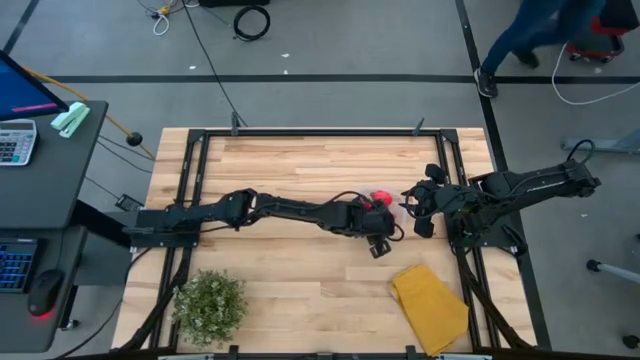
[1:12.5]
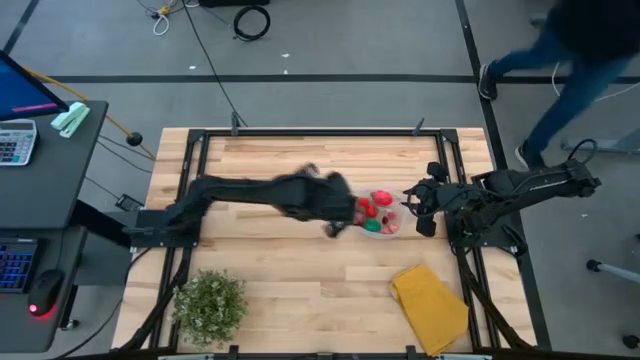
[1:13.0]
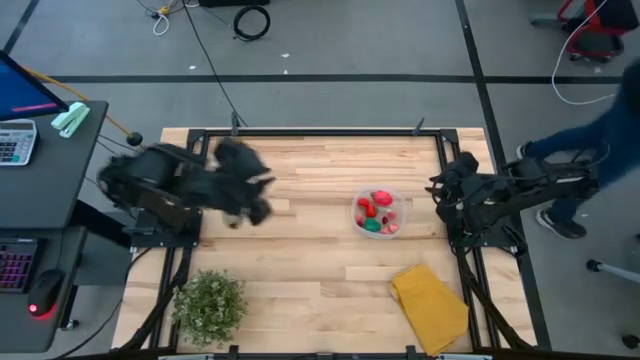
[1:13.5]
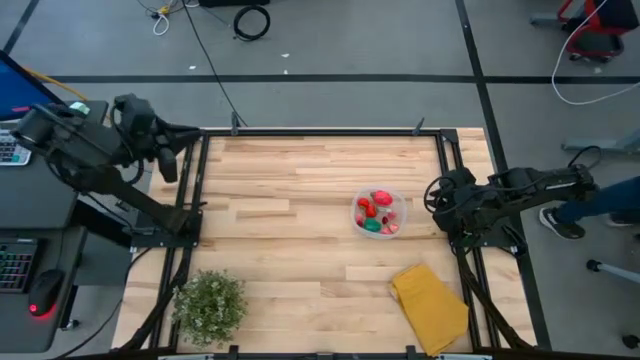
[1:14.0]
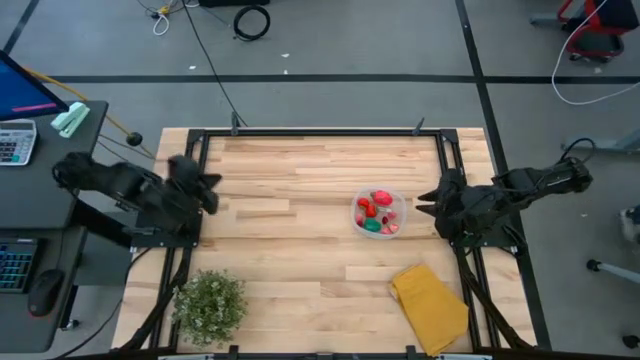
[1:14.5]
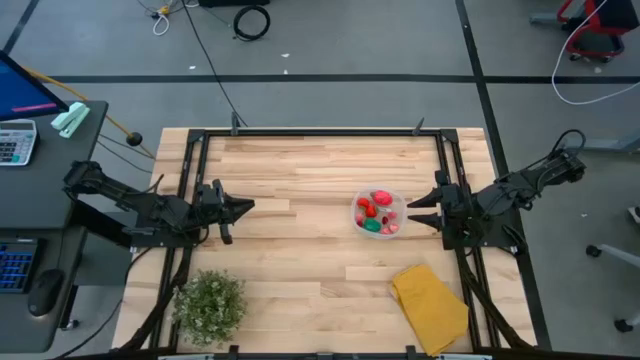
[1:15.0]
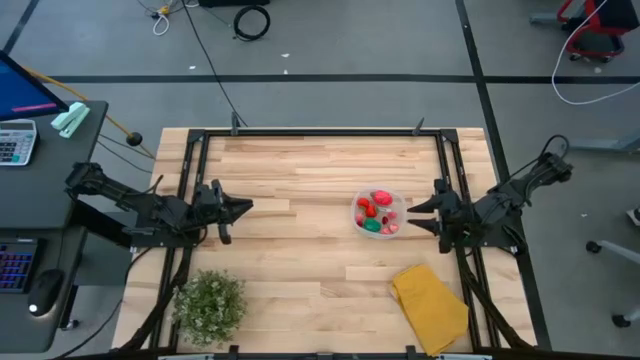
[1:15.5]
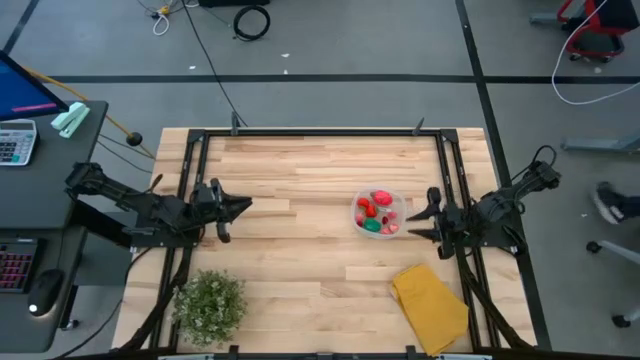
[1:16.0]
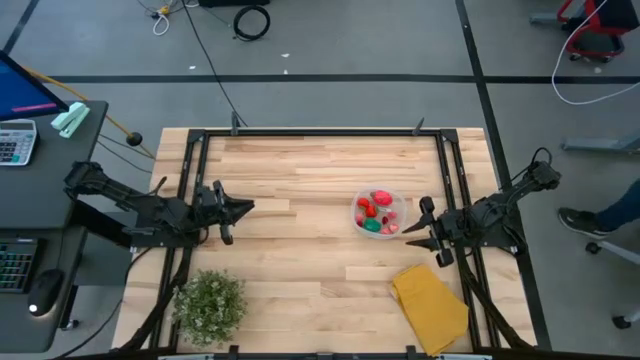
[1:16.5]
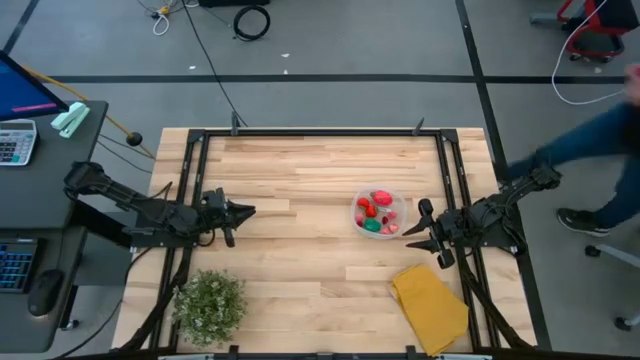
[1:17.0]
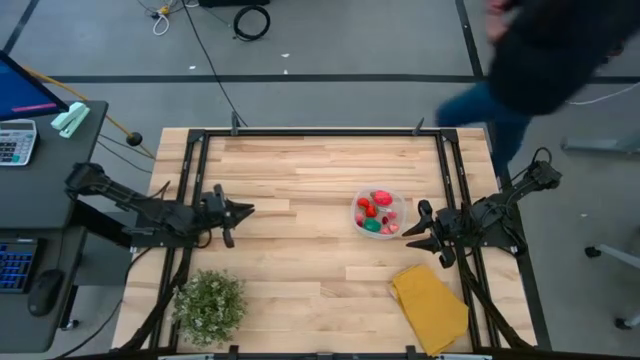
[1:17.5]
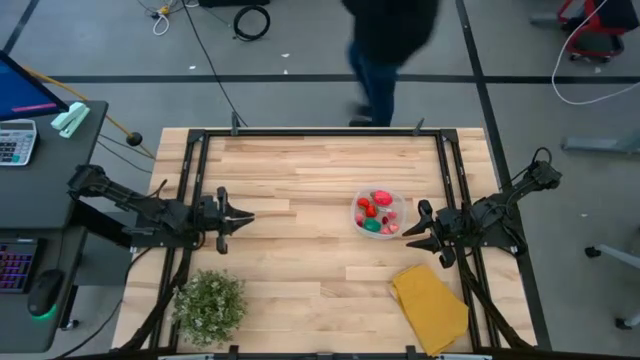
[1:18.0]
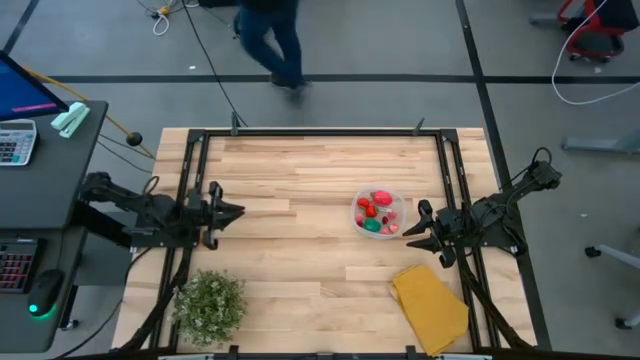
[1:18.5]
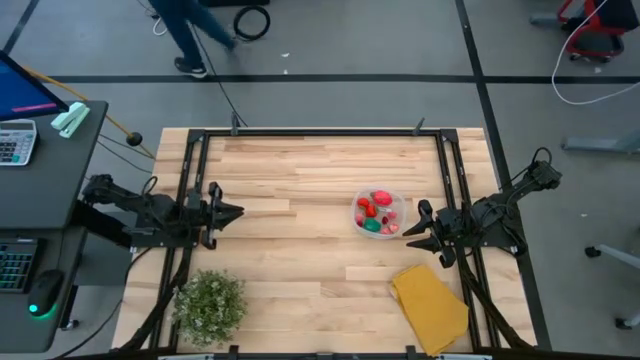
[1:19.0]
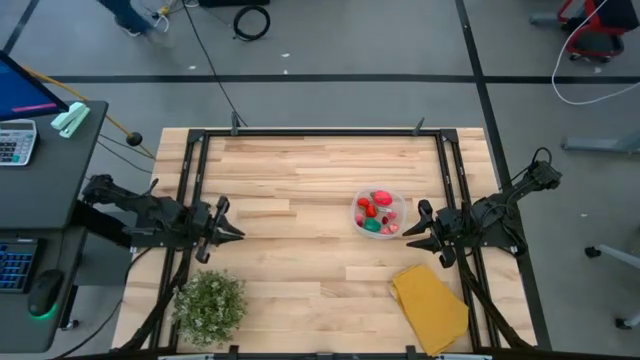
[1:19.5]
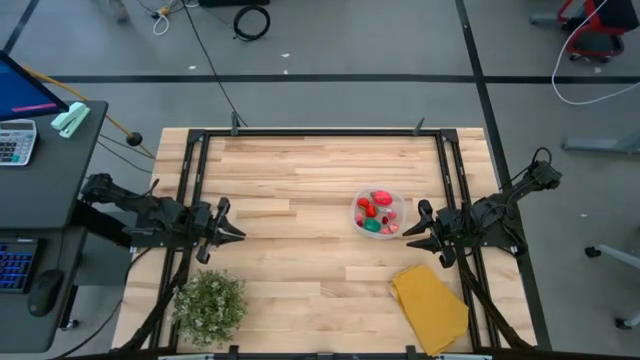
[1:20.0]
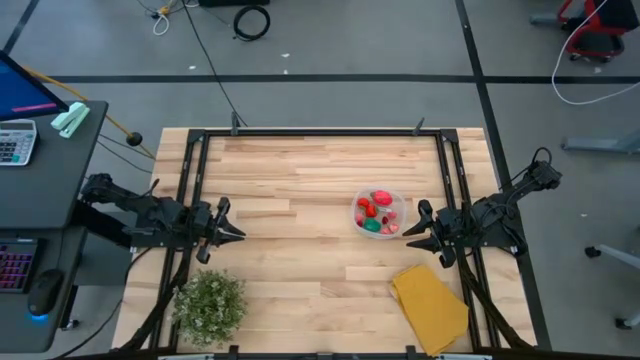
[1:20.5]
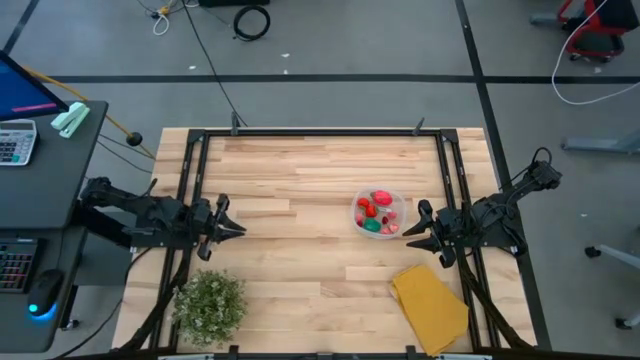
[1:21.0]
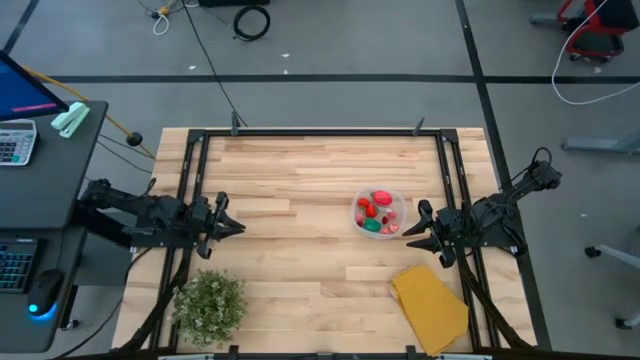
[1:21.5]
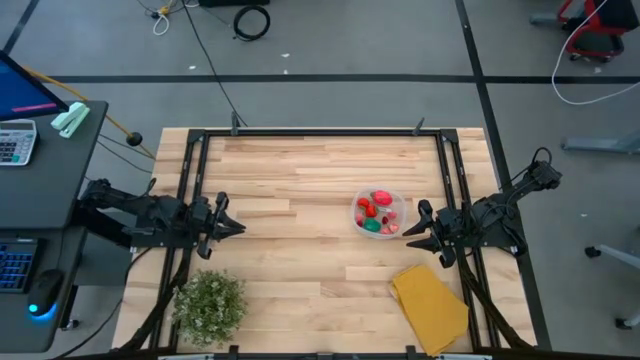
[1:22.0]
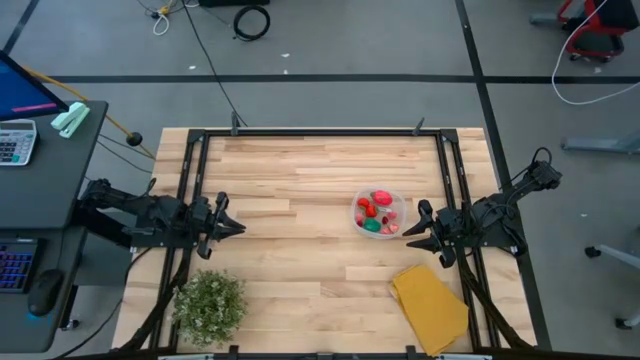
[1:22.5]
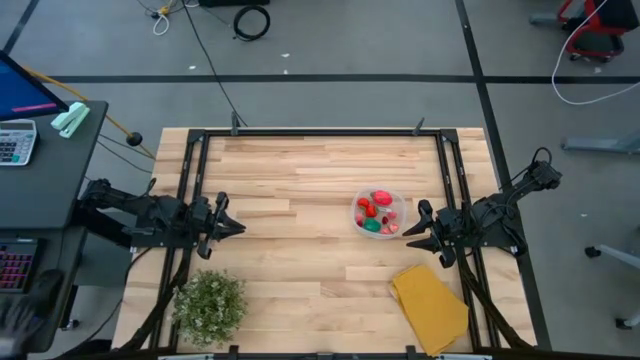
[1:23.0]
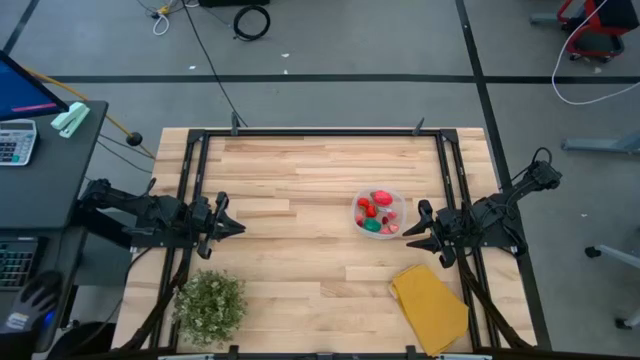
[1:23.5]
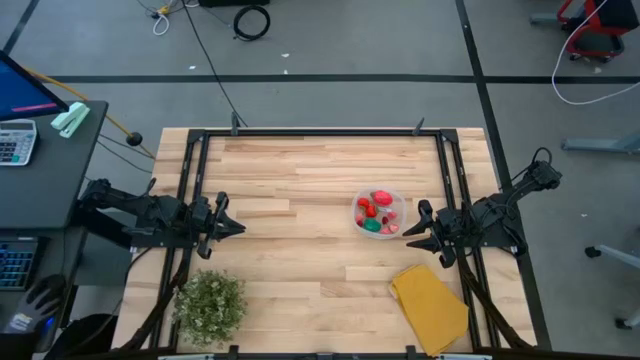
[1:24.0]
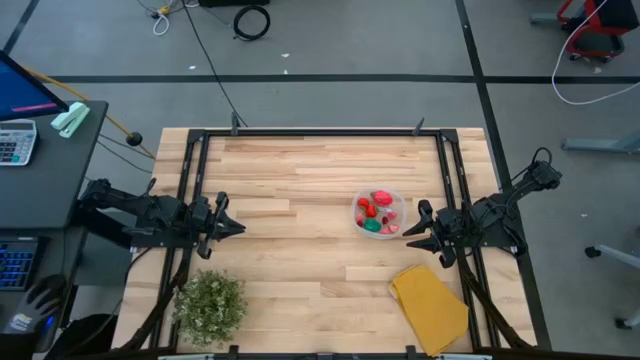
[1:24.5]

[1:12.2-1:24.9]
Task: Pick and placing Produce into tupperware
Return to Home Position

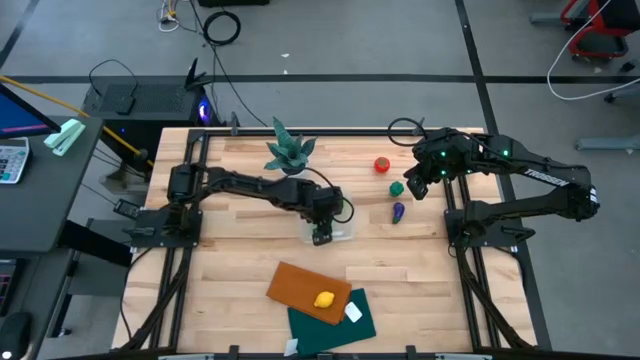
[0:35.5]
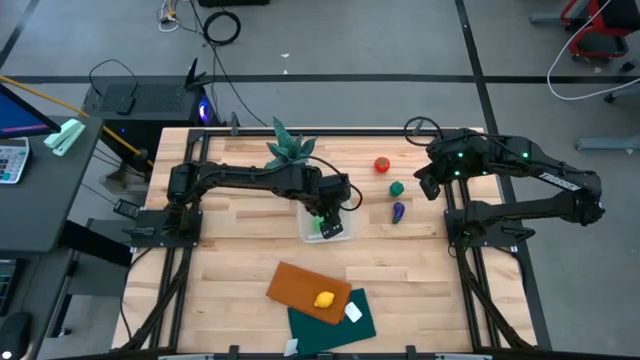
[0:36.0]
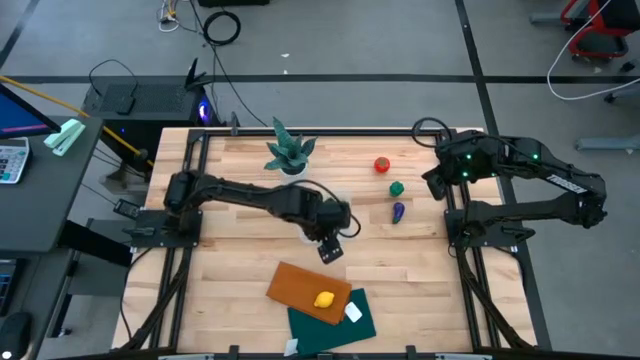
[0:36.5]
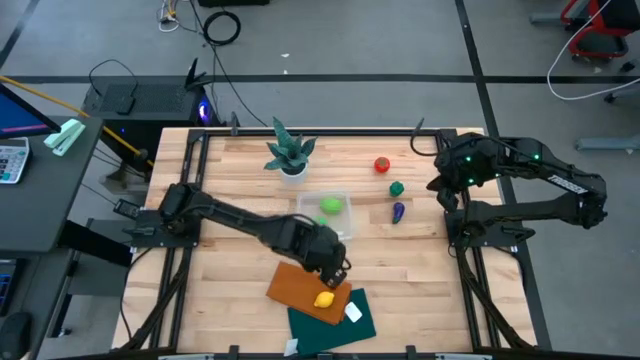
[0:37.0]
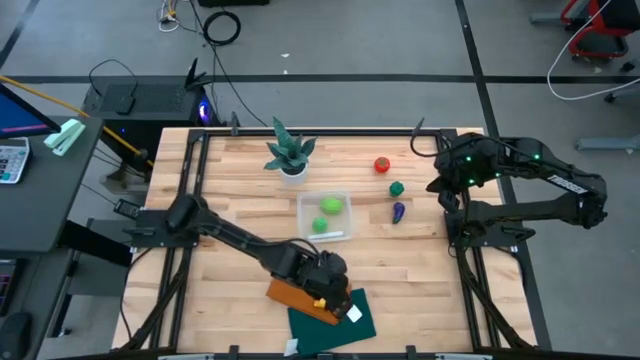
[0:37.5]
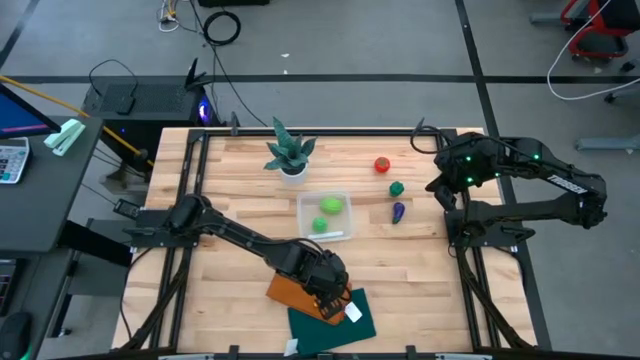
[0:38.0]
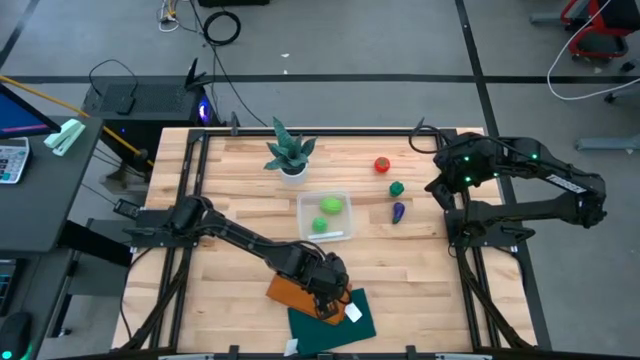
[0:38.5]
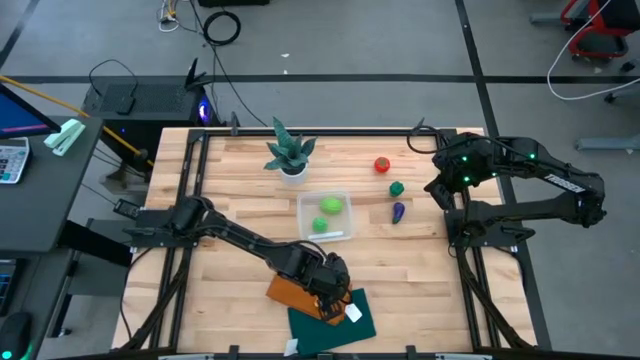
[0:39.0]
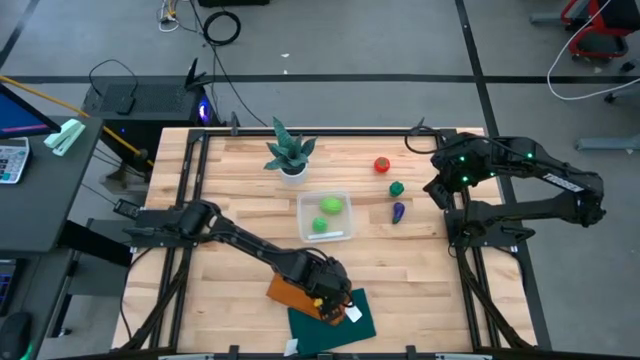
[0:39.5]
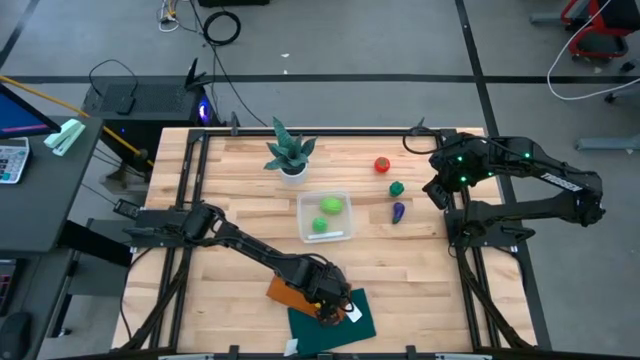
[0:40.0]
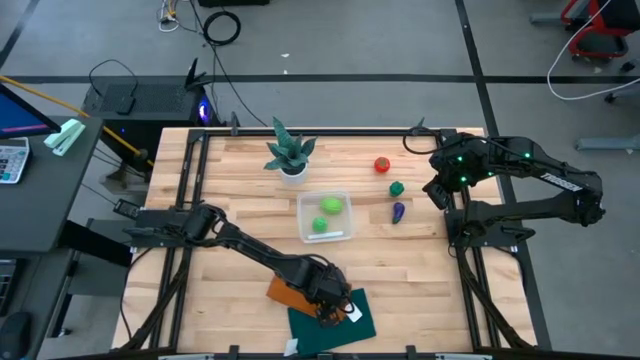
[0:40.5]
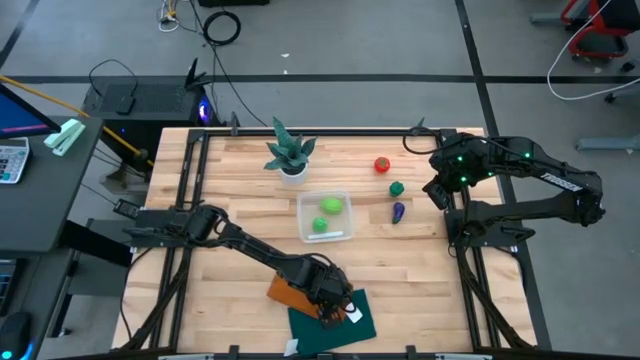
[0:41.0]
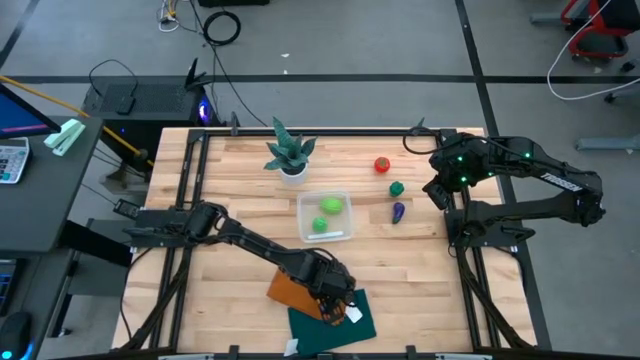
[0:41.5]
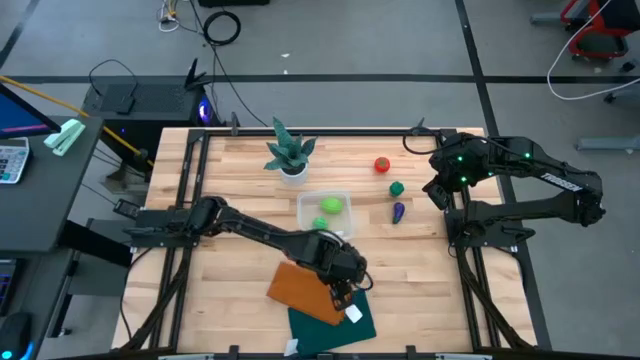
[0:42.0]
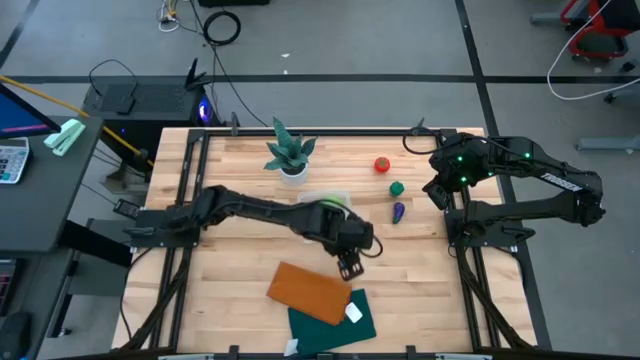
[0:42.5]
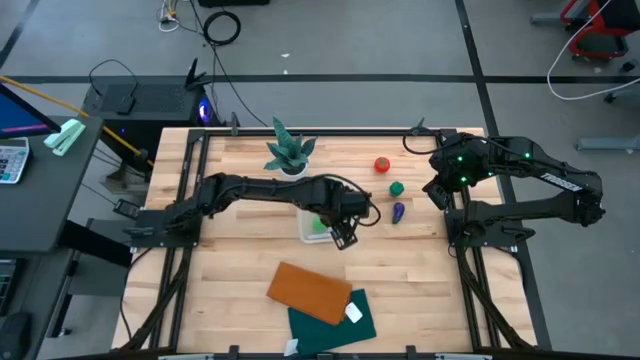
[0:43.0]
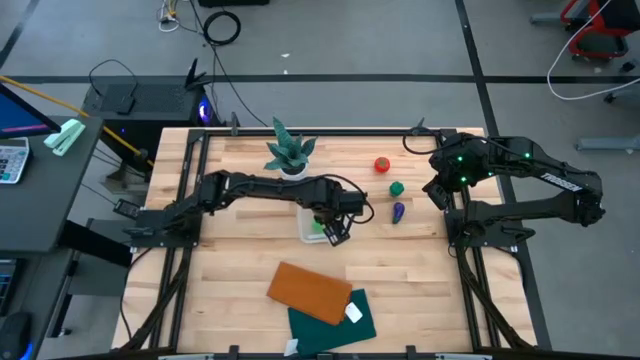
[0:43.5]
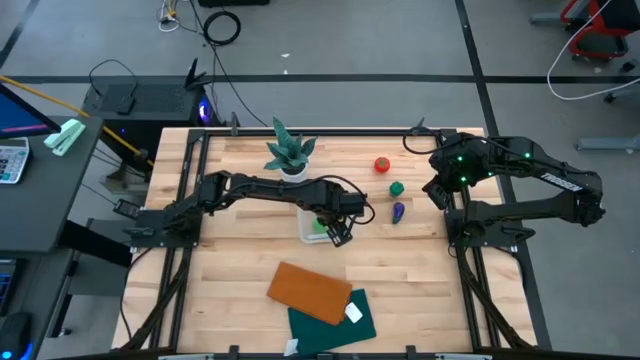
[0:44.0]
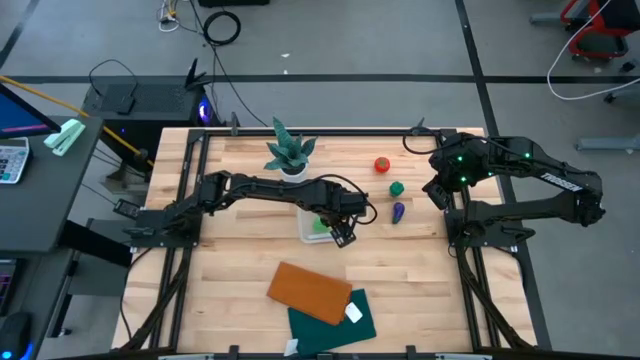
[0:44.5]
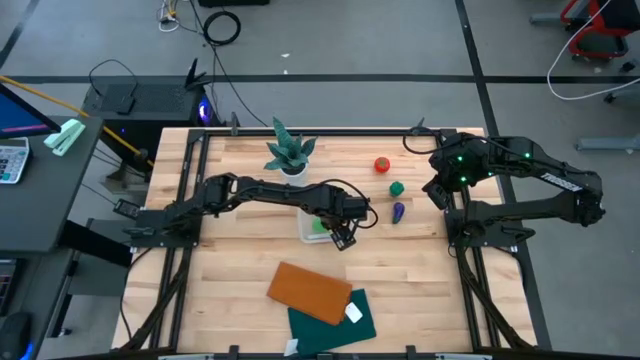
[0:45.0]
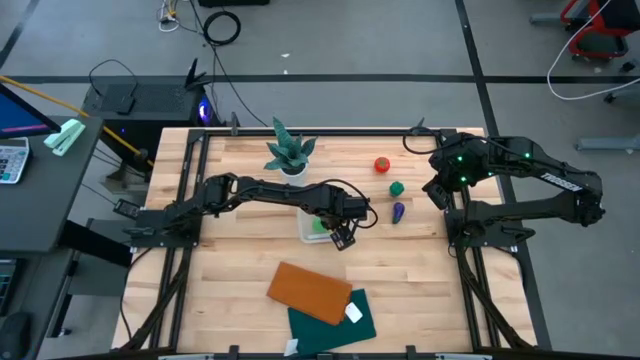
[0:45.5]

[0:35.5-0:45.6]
Task: Pick and placing Produce into tupperware
Put the lemon into the transparent bin
